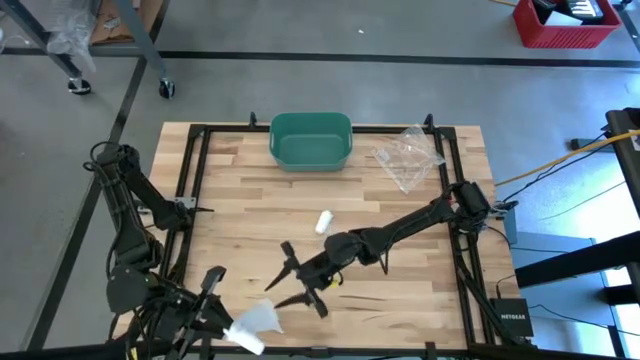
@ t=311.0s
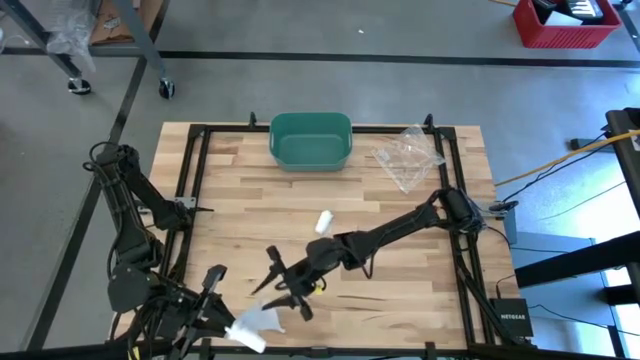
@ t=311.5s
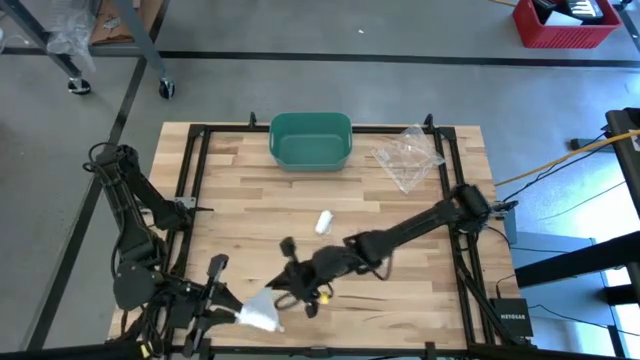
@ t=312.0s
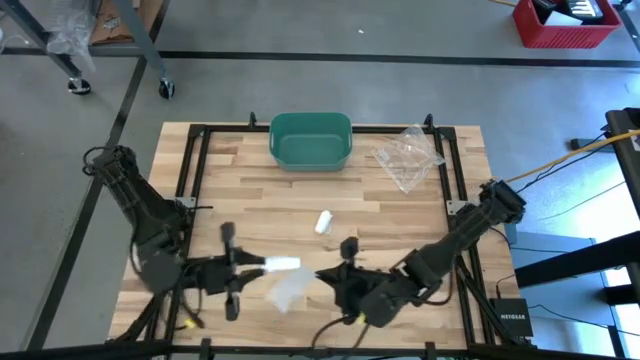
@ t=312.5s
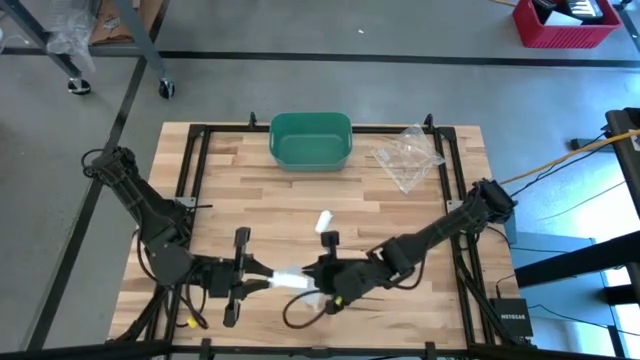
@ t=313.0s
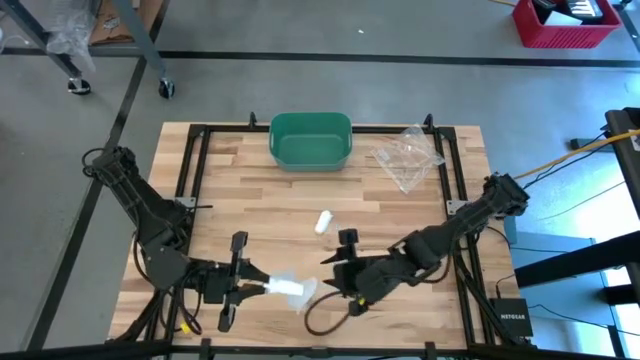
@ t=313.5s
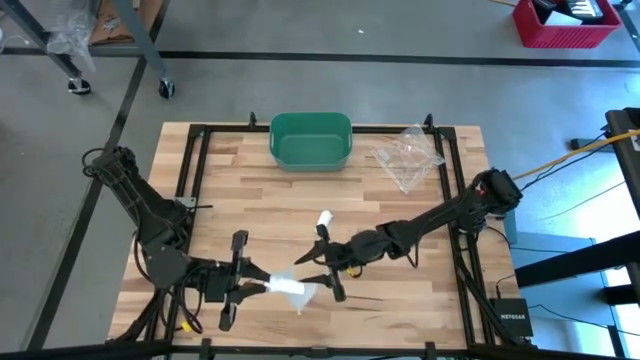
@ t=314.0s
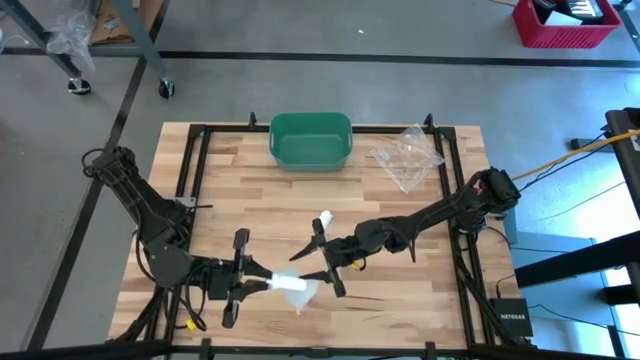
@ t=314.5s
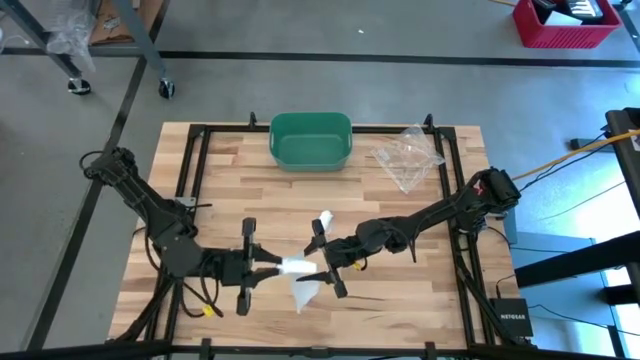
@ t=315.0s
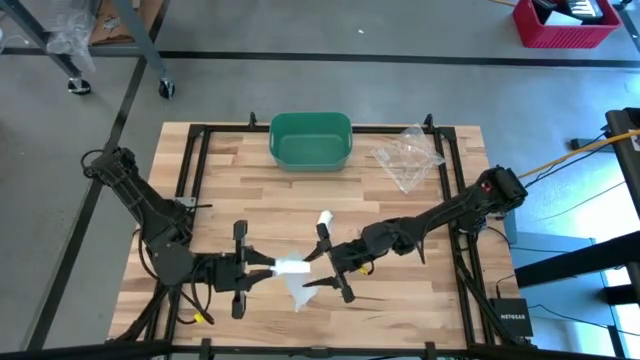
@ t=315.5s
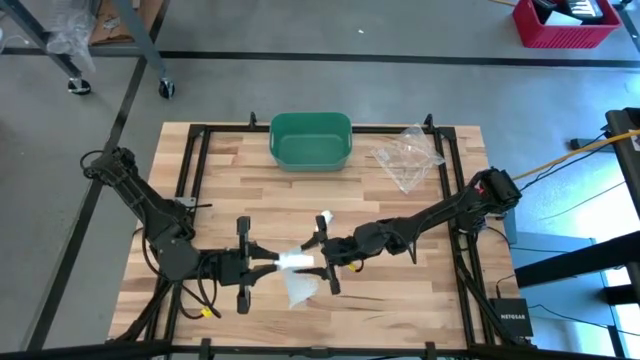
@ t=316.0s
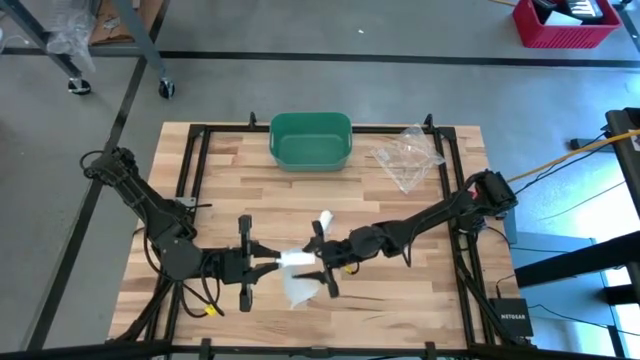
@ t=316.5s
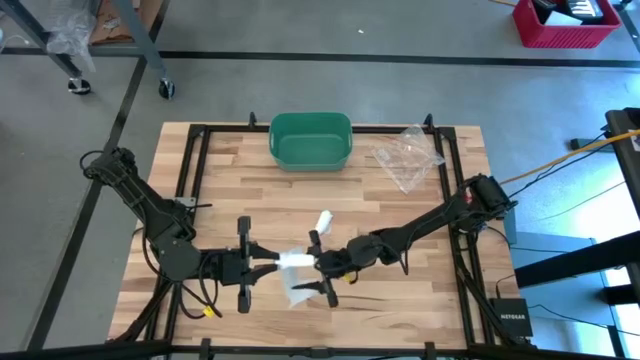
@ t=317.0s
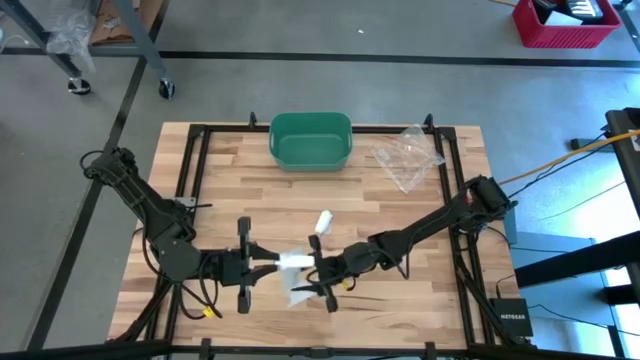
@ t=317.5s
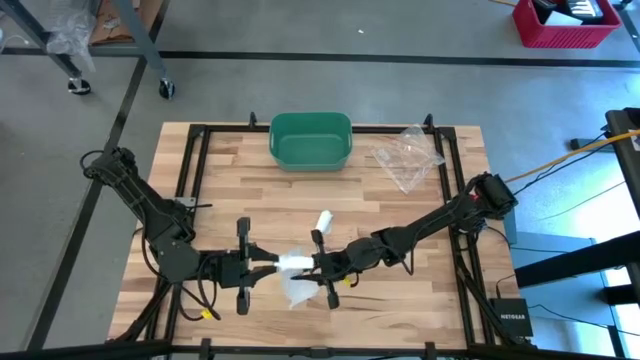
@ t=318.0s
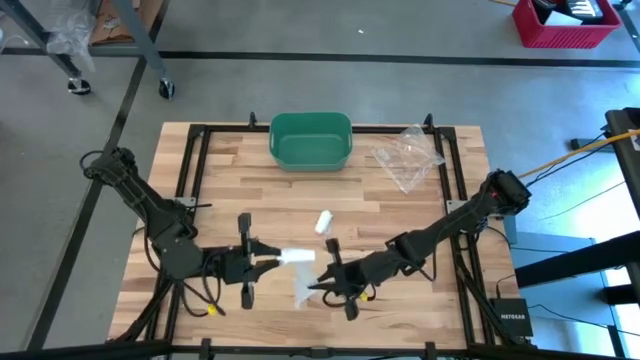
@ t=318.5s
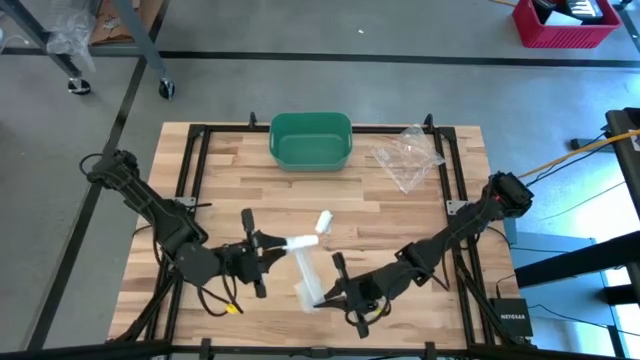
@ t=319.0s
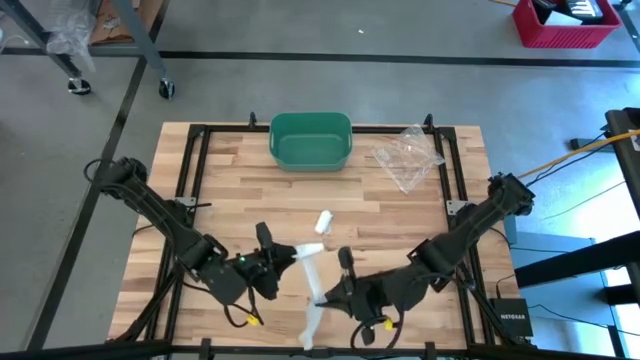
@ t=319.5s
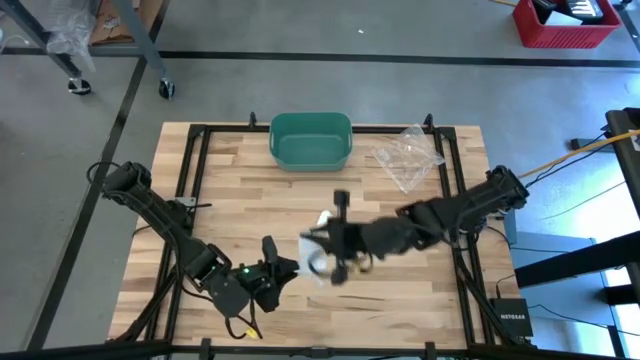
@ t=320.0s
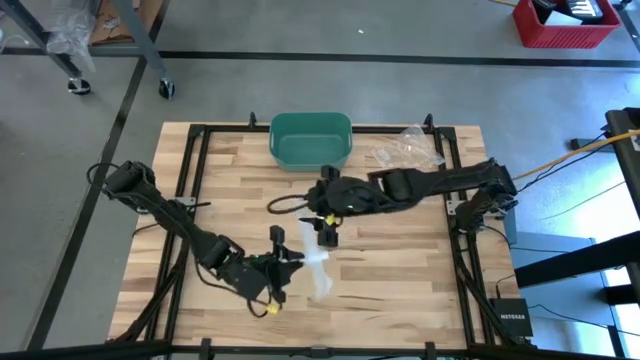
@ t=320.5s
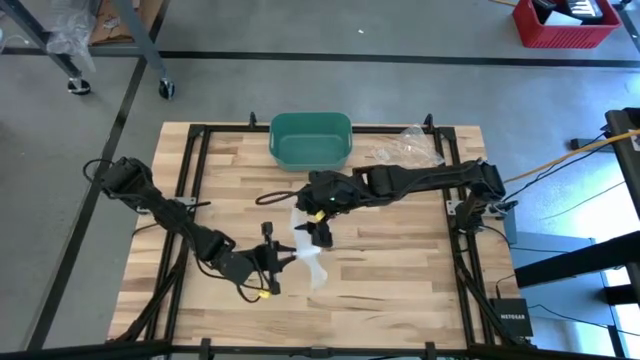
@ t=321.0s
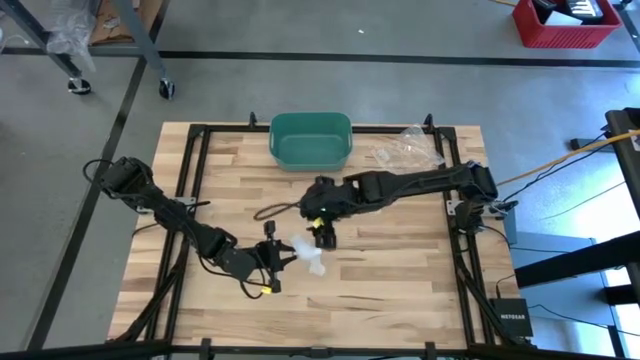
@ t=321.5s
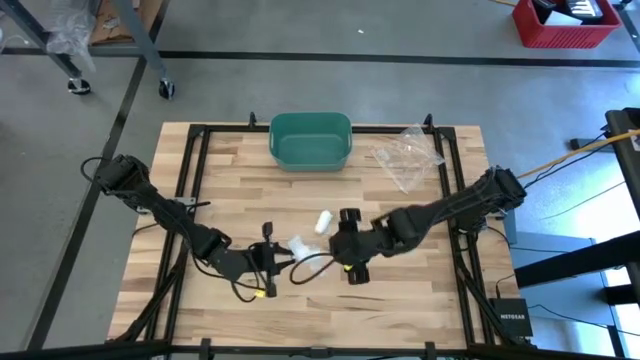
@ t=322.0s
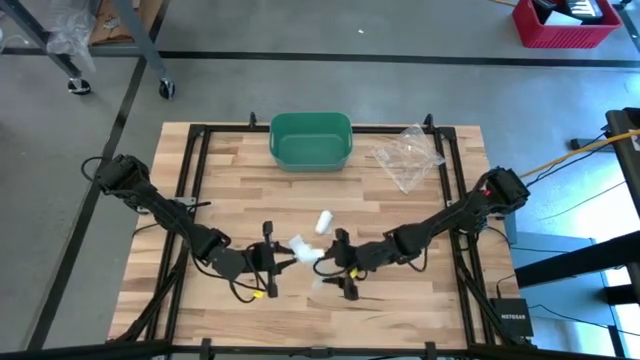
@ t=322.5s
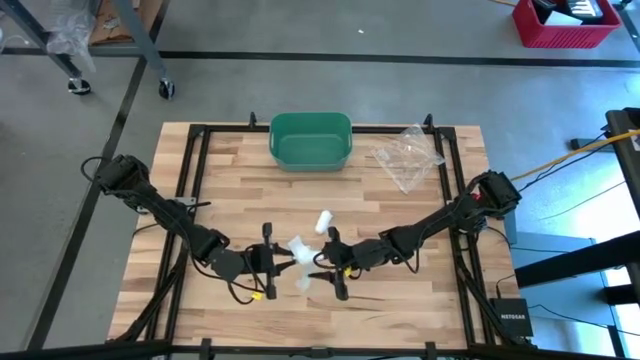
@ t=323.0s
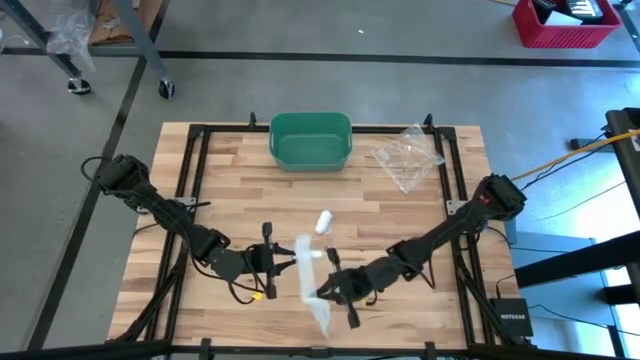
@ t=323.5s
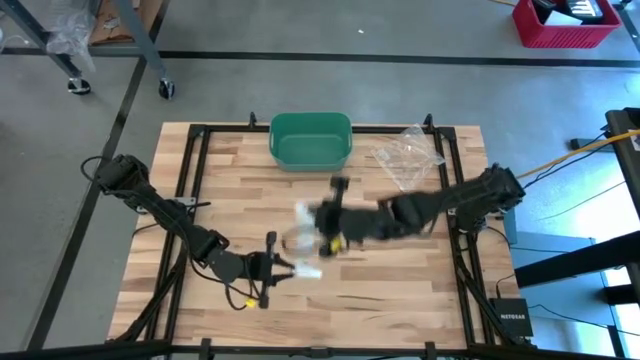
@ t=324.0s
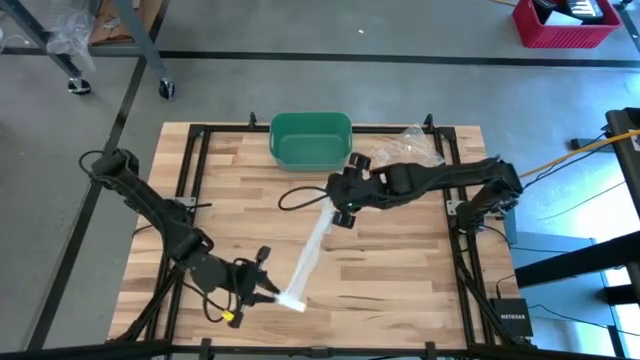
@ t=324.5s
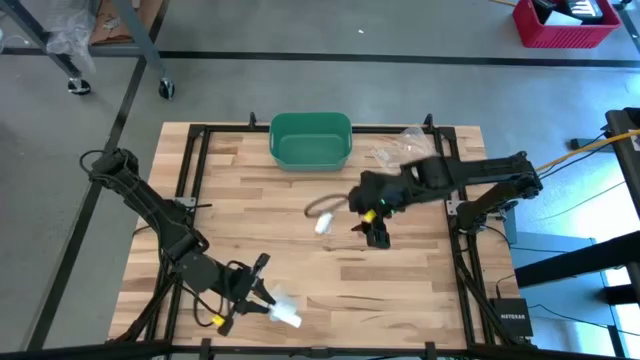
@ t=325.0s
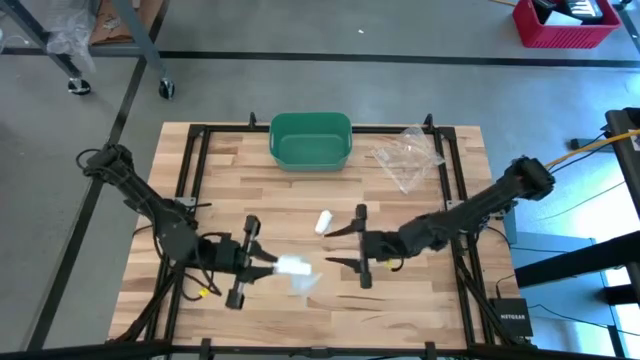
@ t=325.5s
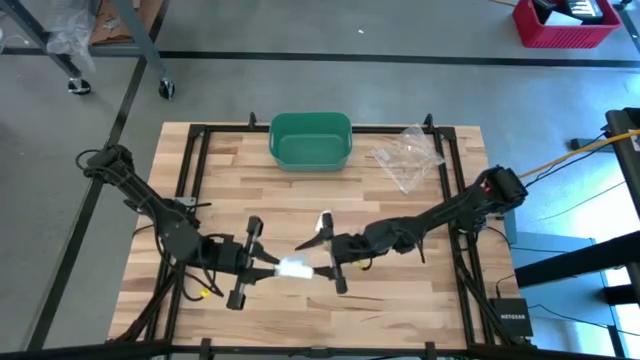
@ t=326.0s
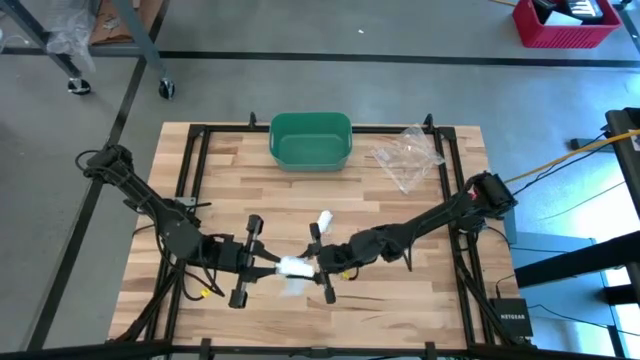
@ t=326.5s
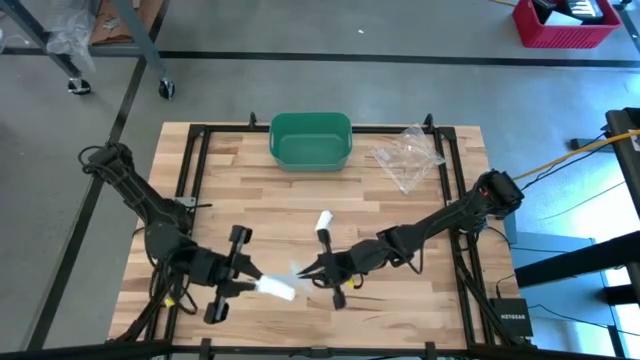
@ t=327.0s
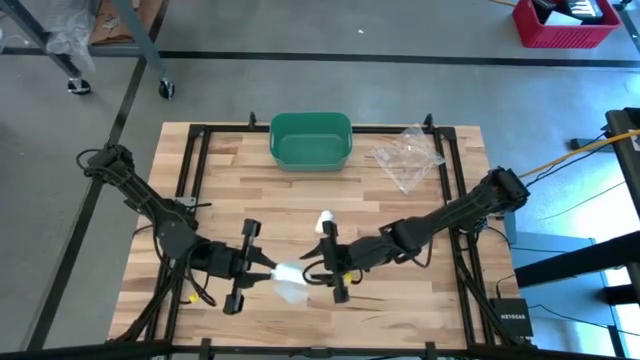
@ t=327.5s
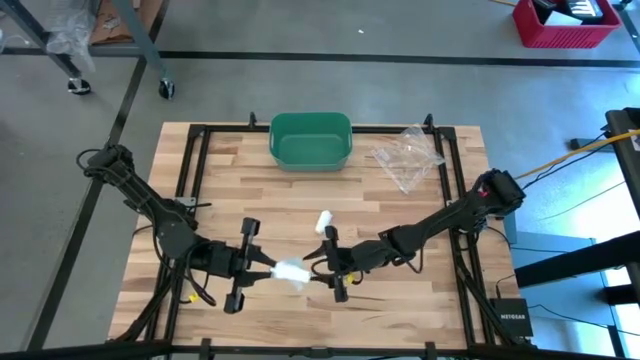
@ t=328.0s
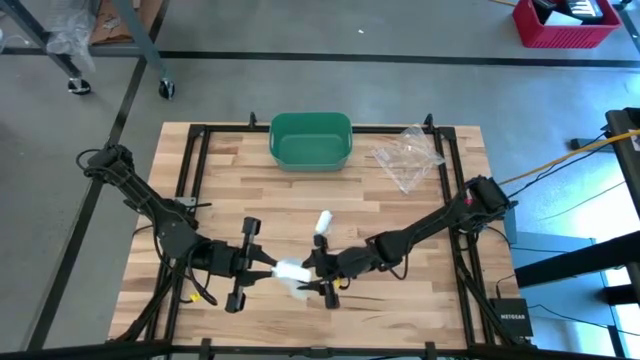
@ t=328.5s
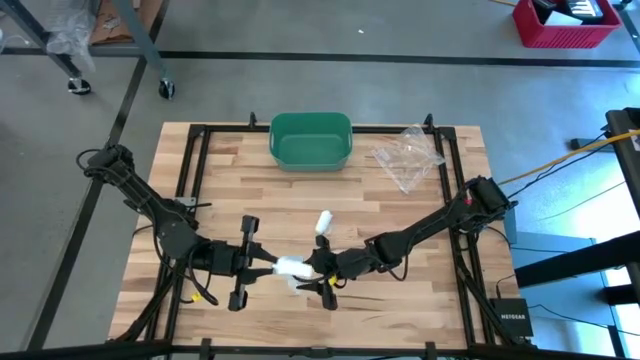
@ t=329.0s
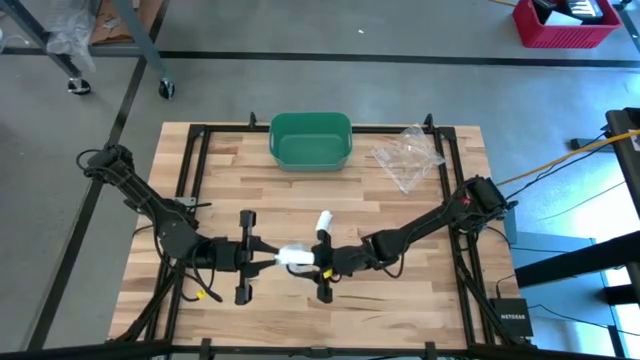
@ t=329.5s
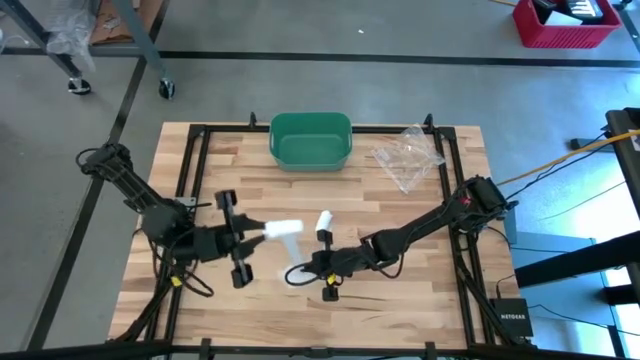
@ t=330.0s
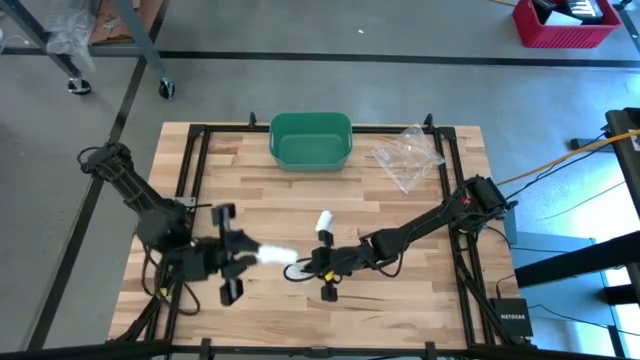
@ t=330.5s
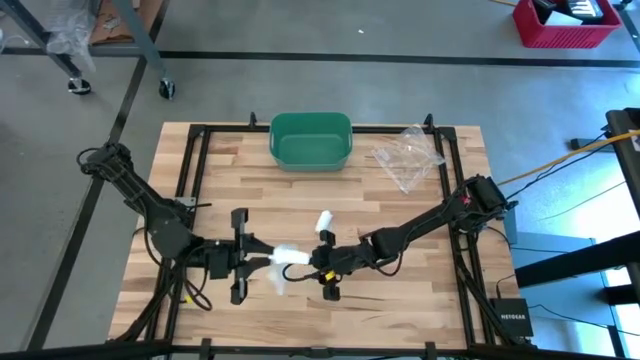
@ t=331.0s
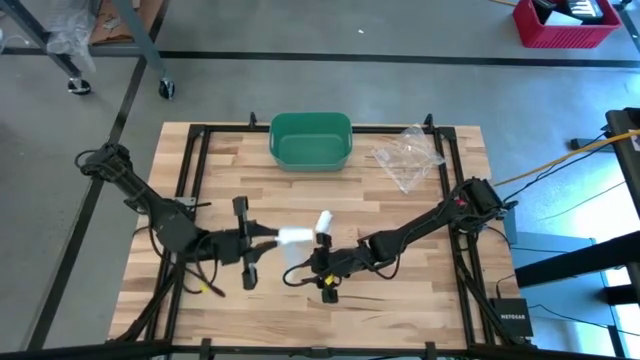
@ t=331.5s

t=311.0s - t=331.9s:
Task: Roll bandage
Roll the bottom white bandage
